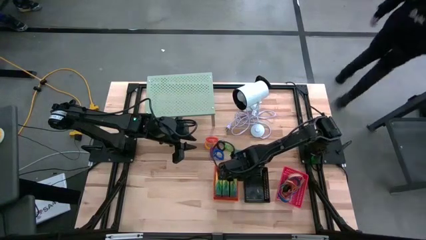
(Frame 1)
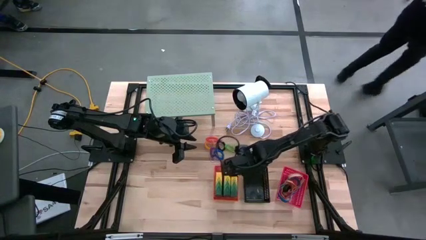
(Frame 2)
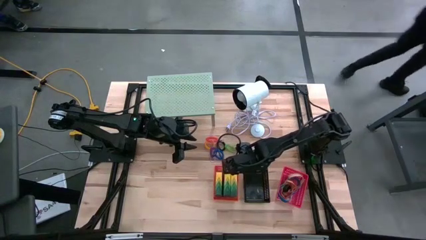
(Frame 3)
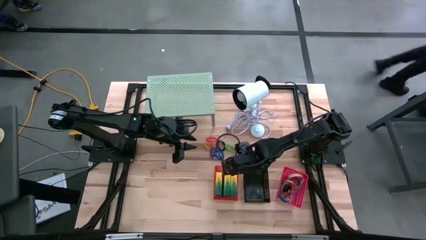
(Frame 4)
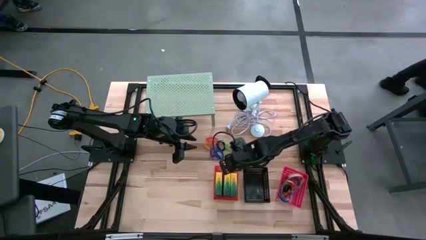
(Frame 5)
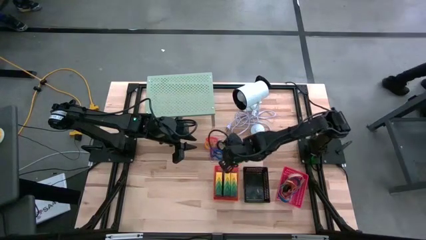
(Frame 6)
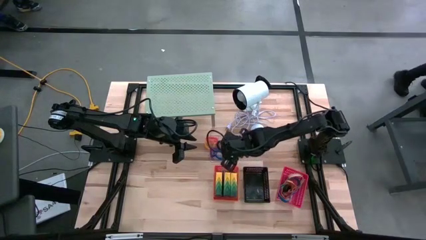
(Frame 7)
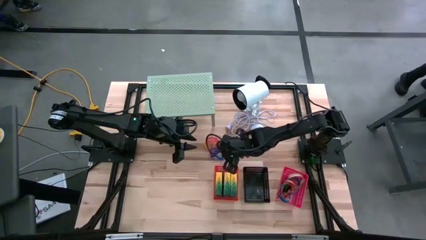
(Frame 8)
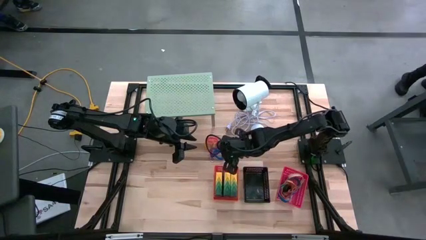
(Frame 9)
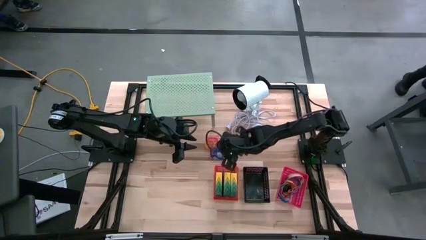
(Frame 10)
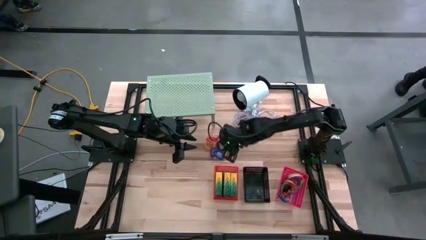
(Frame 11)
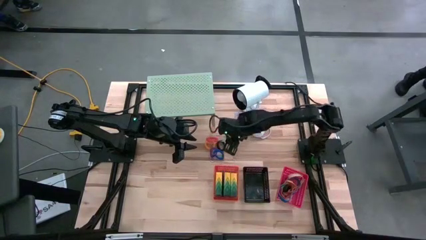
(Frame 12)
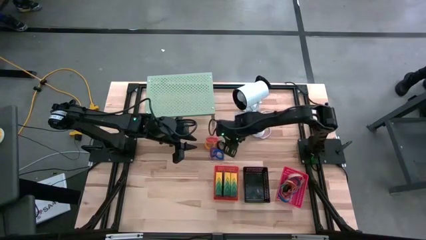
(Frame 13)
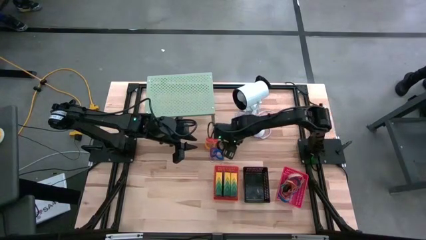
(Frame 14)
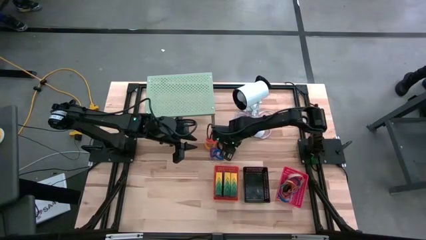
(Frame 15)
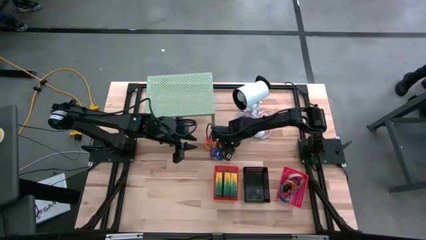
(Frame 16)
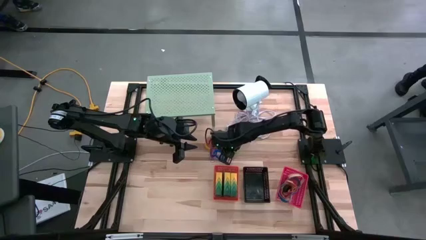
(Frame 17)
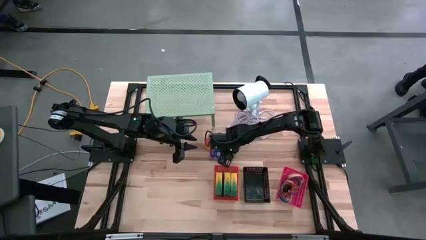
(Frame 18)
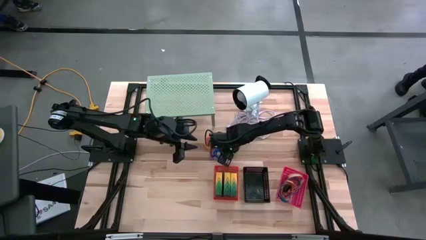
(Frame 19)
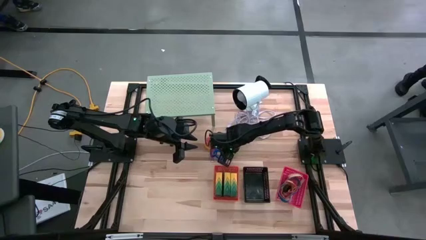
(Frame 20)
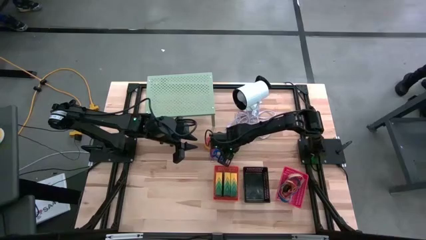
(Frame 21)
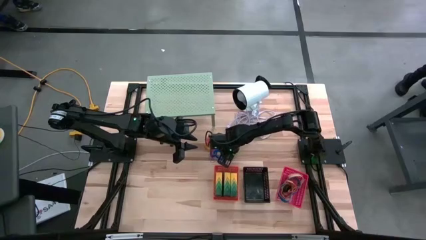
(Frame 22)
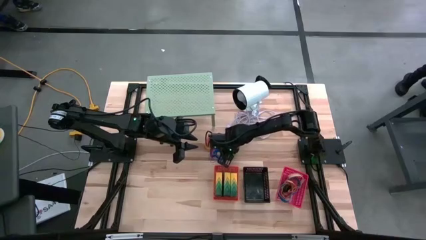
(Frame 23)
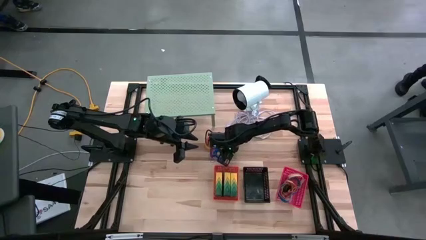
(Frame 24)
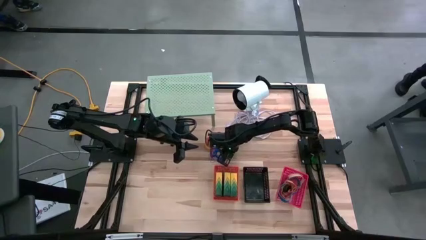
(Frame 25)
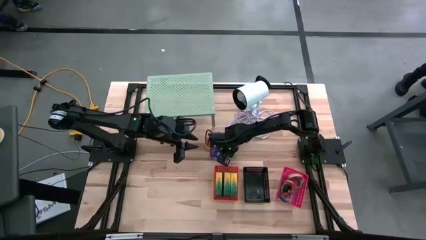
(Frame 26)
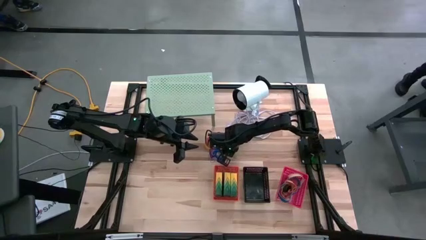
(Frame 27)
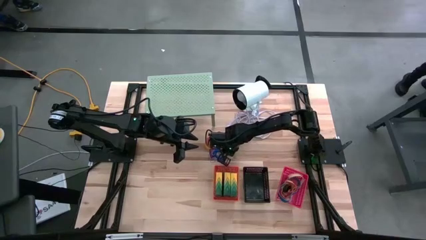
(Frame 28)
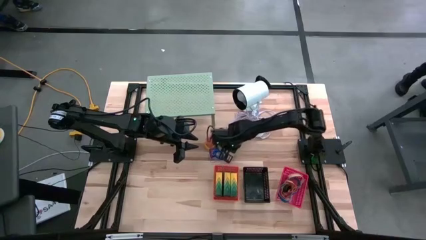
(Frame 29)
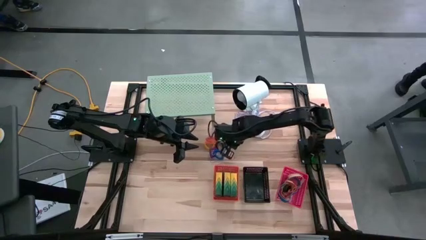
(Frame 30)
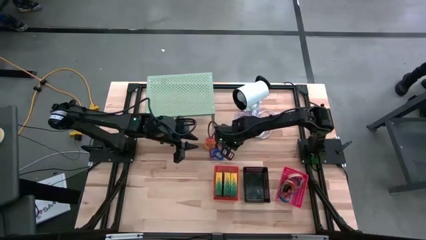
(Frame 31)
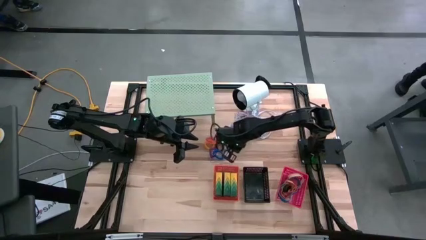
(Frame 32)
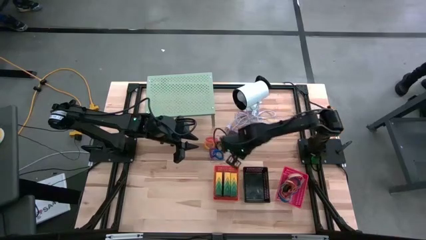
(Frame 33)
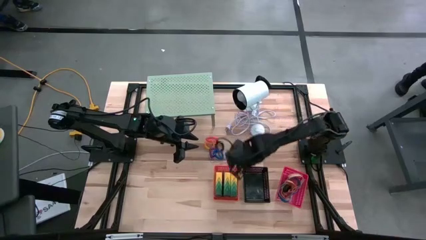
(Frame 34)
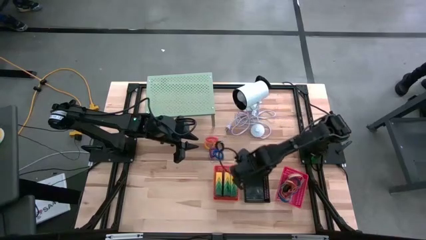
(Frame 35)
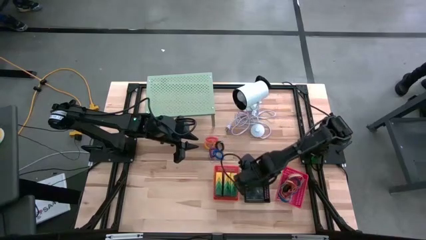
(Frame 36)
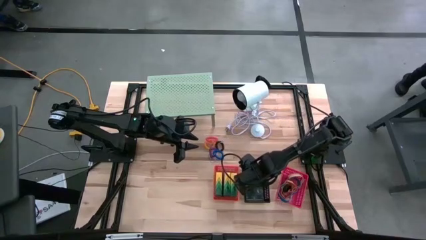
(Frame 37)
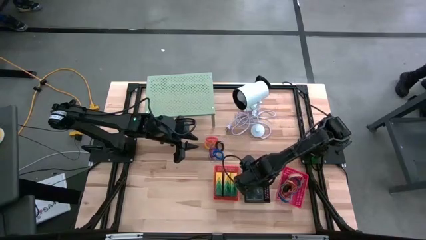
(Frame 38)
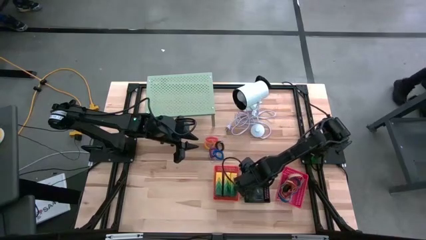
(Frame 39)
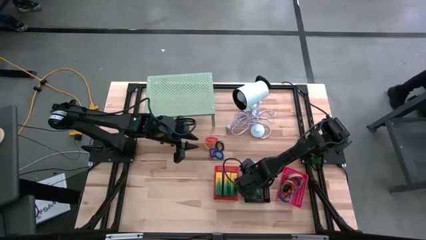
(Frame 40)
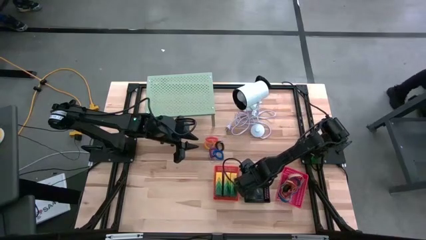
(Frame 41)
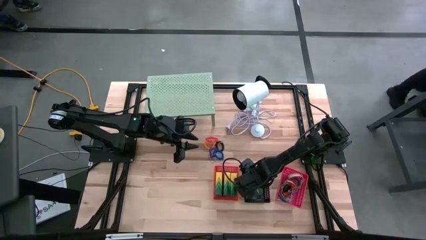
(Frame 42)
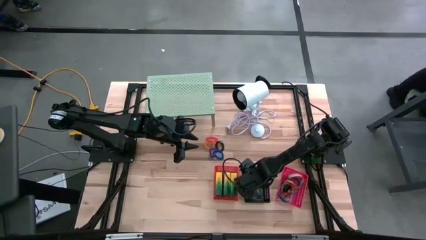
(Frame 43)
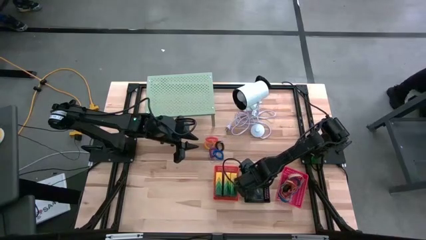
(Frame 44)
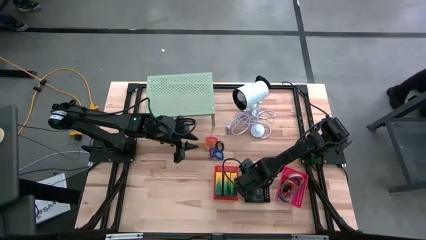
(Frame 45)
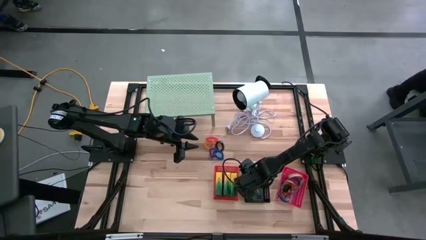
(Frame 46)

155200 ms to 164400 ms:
Task: Pick & Place Office Desk Supplies
Put the green wrist coil into the black basket

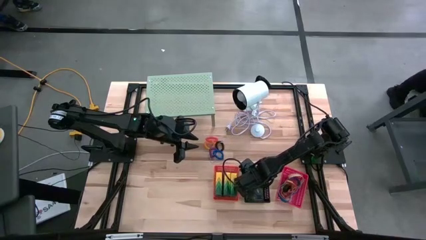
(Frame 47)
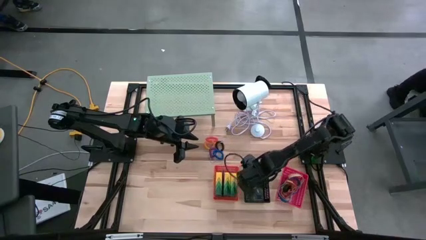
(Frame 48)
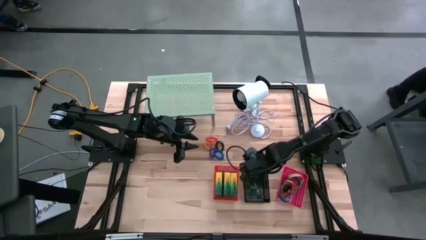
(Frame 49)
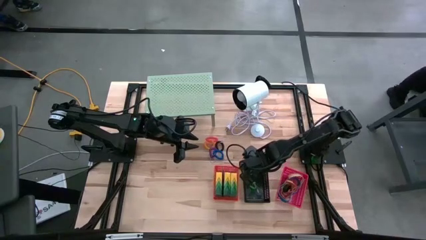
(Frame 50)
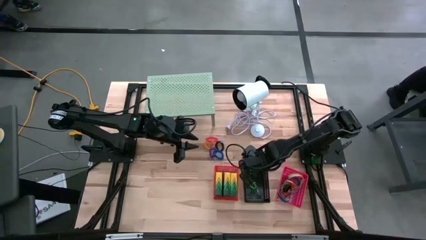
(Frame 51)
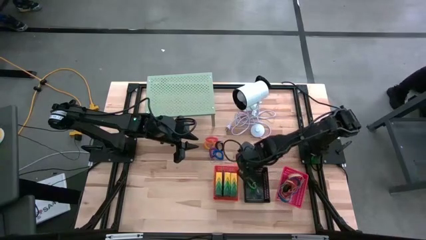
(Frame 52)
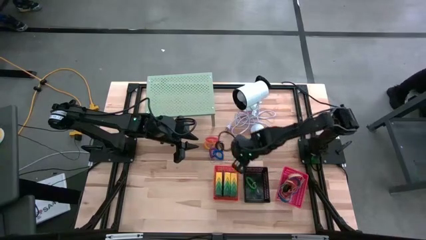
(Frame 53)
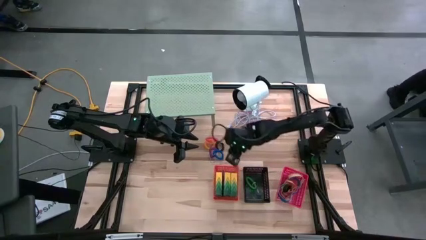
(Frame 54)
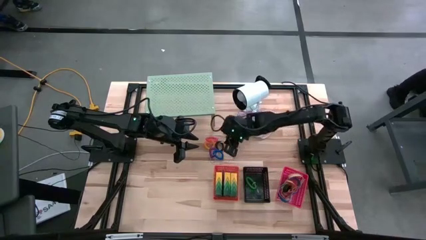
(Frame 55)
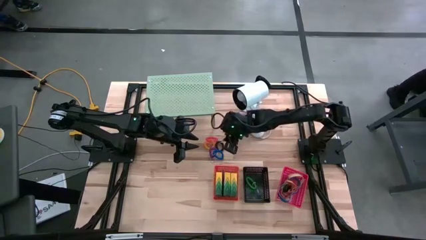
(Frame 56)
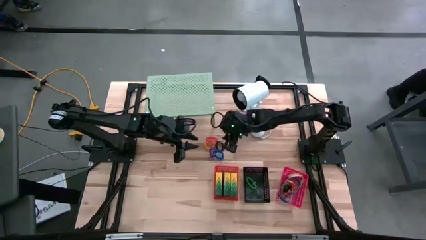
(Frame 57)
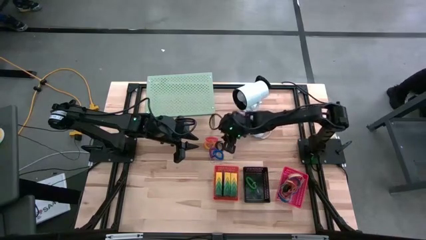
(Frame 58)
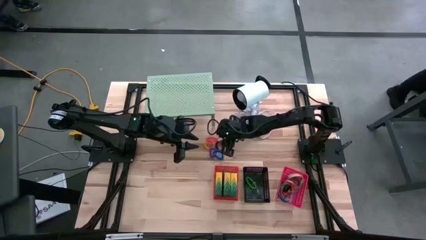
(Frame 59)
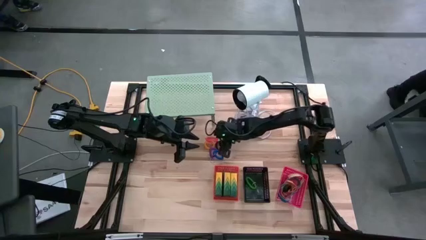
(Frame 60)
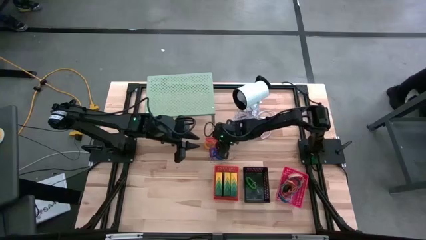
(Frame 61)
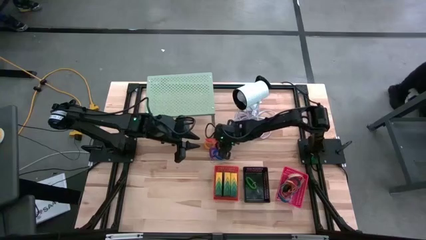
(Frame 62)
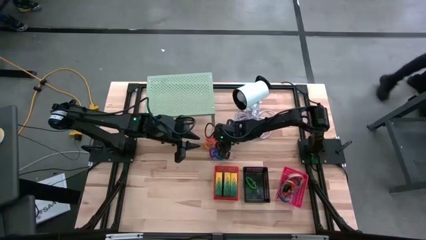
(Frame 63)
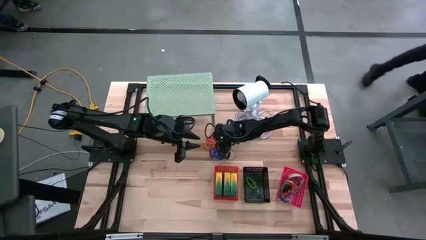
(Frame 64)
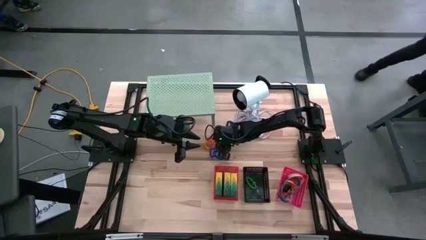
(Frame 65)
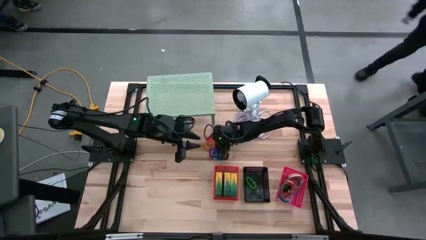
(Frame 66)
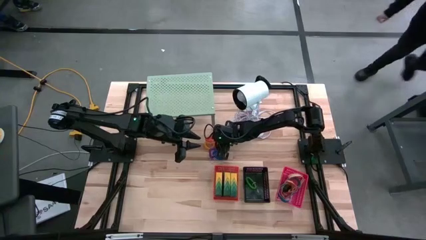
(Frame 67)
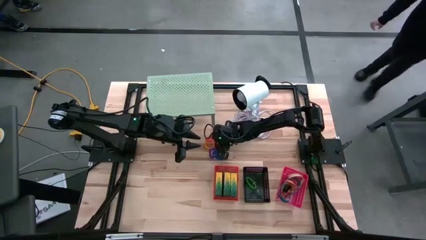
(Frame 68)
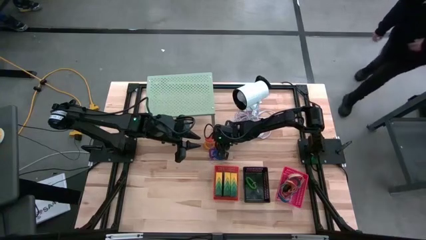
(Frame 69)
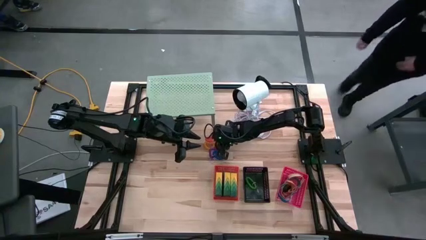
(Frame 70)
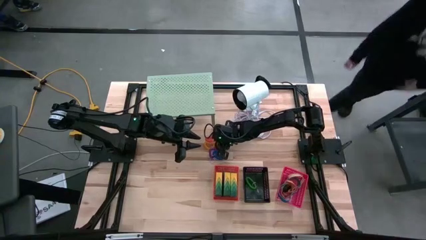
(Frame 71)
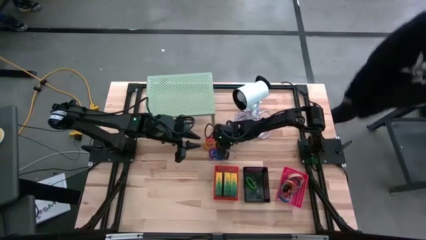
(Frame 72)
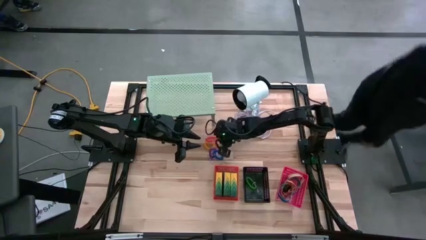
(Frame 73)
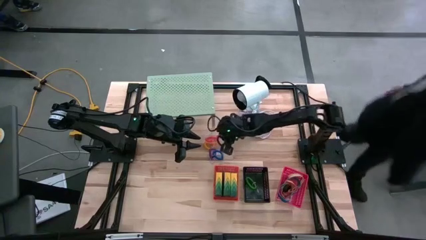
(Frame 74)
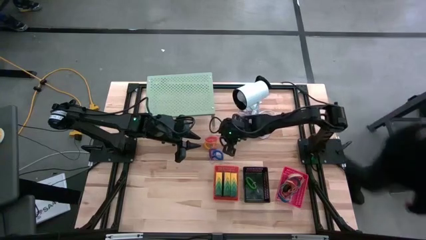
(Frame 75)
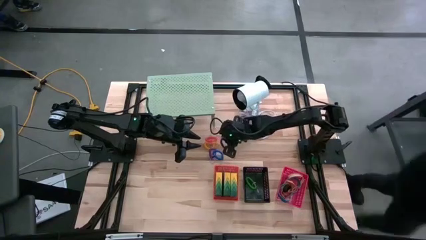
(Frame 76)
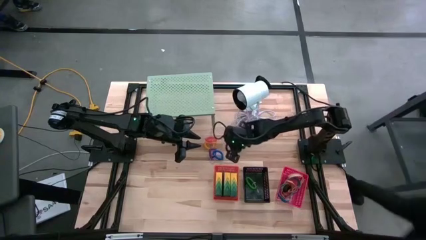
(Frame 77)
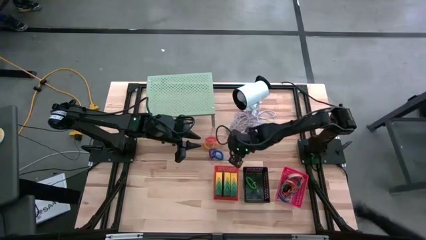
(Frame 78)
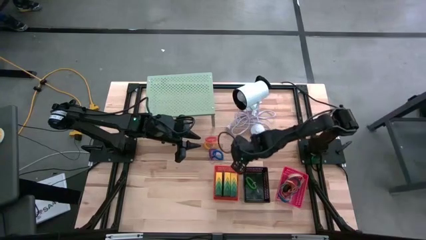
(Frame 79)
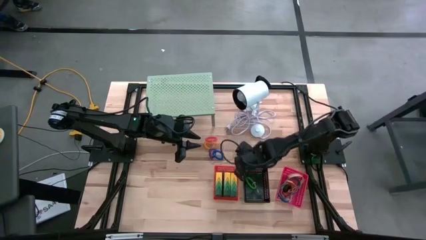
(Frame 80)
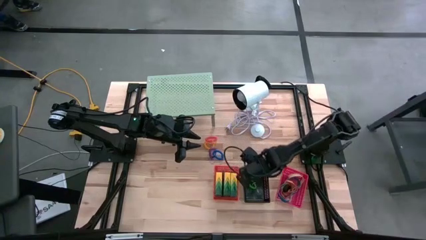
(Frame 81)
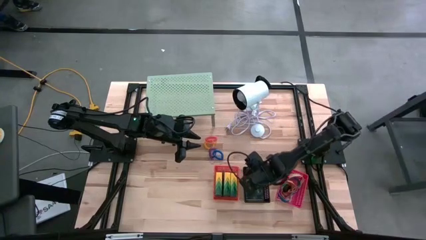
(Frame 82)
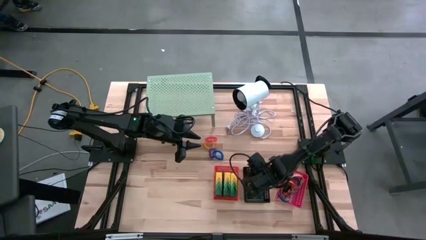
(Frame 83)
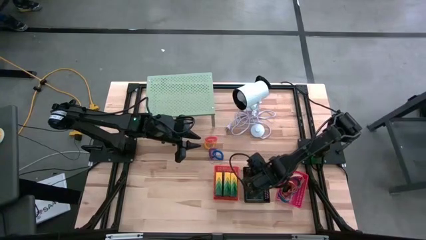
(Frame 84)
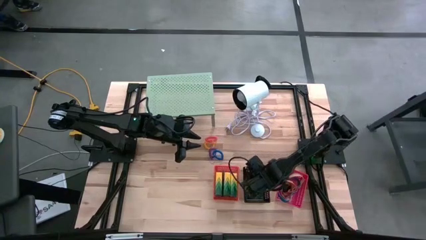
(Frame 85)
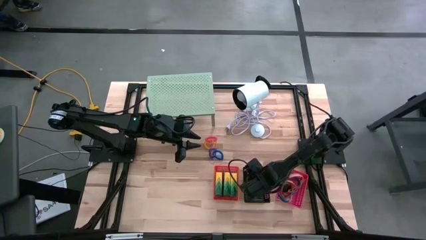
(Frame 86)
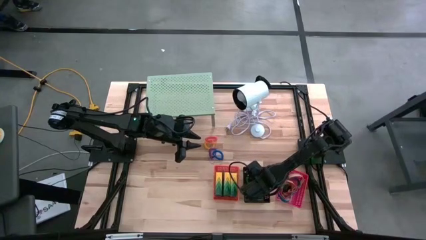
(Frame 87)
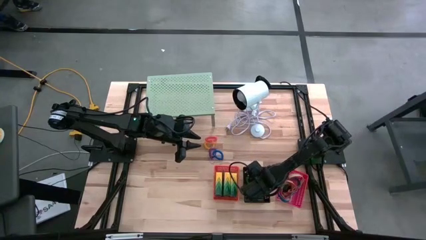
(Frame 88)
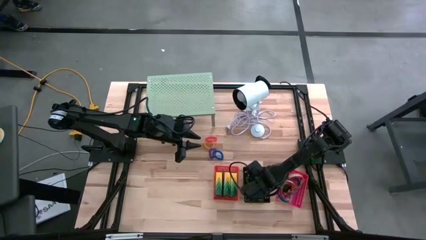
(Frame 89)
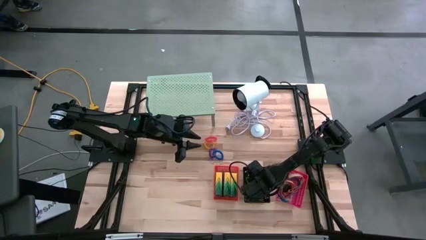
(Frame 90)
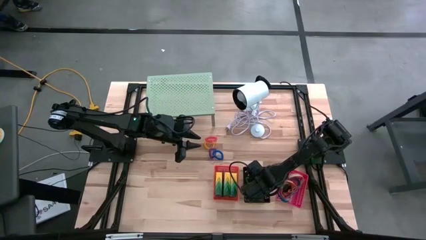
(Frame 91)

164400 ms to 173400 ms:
Put the black wrist coil into the black basket
